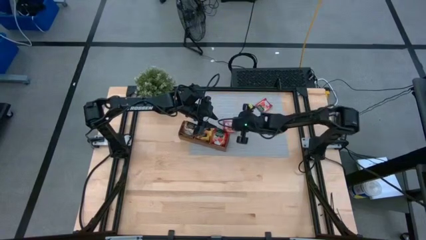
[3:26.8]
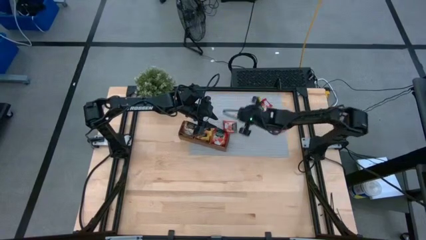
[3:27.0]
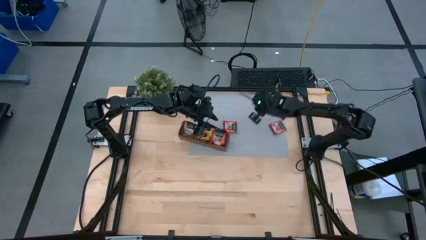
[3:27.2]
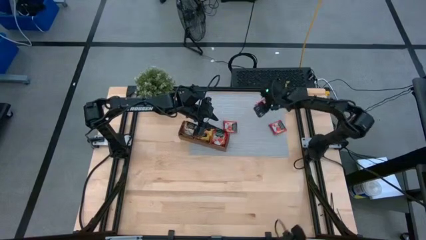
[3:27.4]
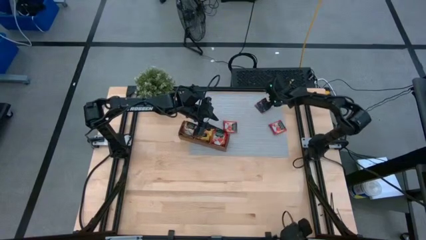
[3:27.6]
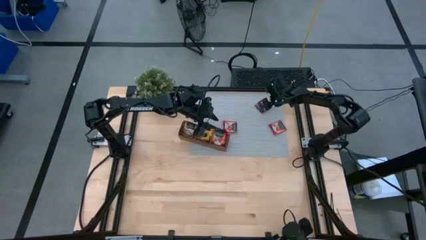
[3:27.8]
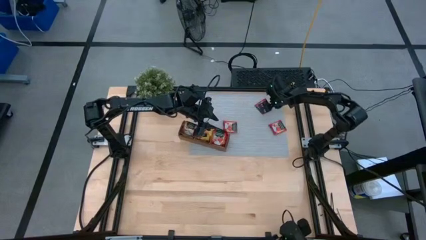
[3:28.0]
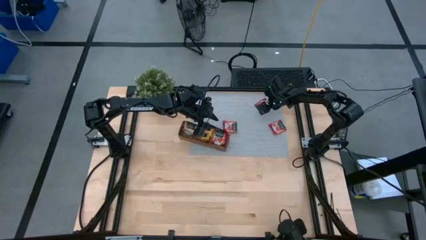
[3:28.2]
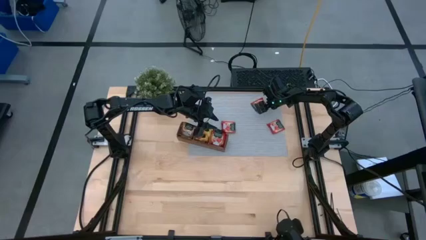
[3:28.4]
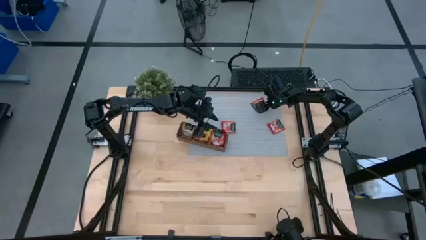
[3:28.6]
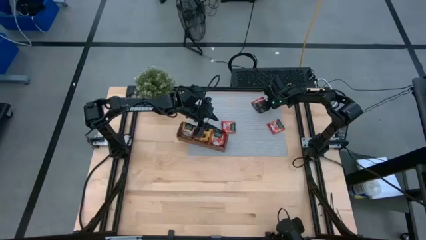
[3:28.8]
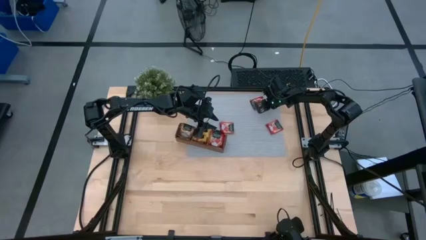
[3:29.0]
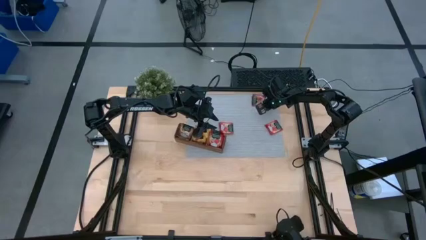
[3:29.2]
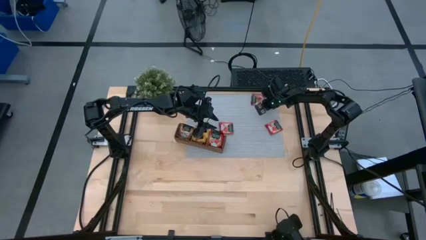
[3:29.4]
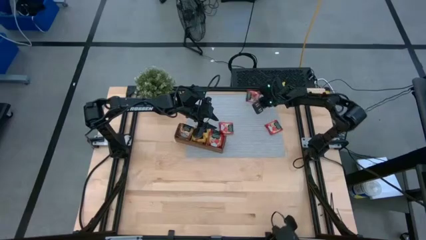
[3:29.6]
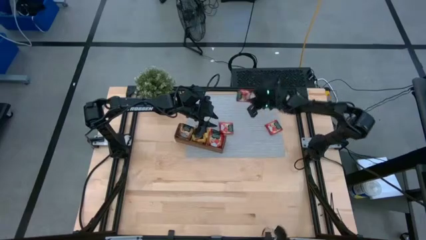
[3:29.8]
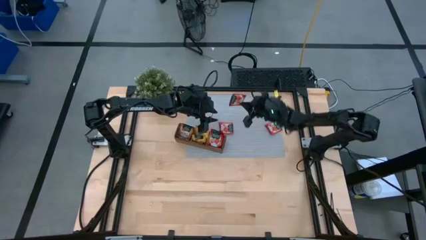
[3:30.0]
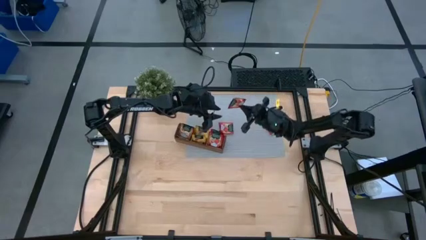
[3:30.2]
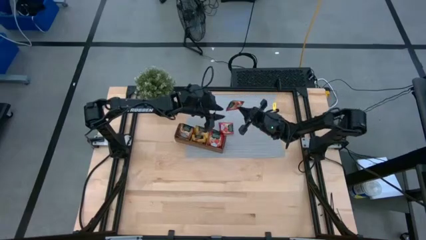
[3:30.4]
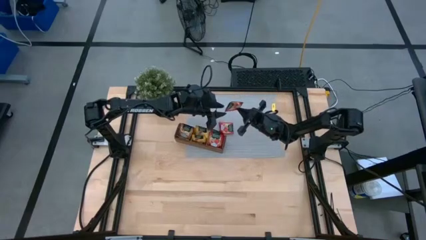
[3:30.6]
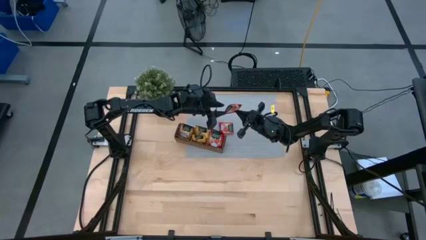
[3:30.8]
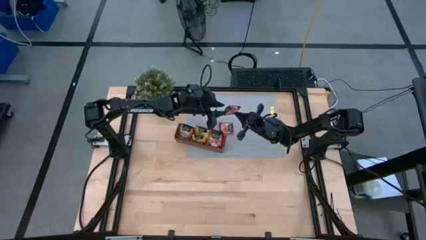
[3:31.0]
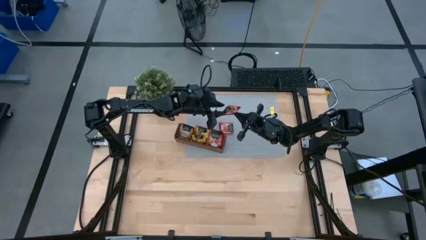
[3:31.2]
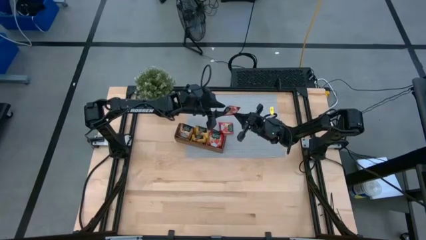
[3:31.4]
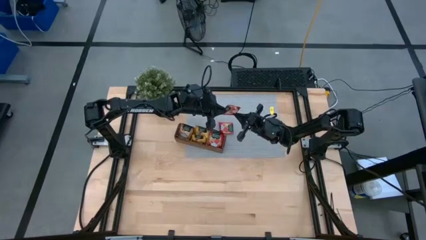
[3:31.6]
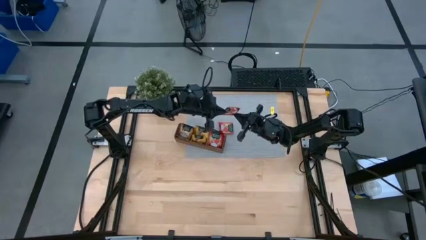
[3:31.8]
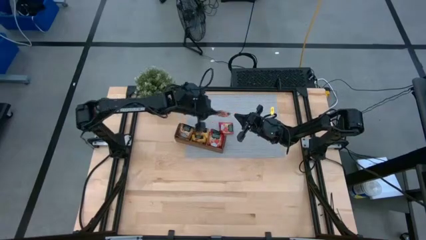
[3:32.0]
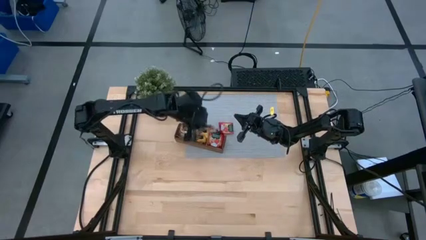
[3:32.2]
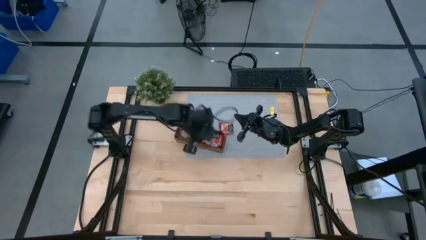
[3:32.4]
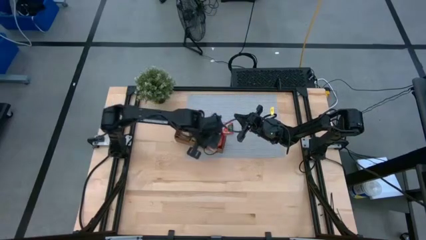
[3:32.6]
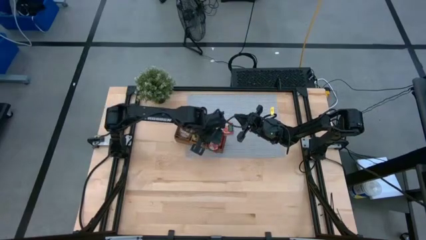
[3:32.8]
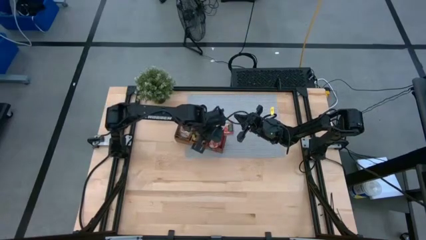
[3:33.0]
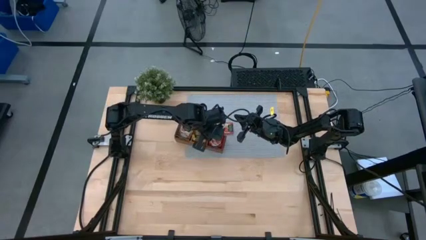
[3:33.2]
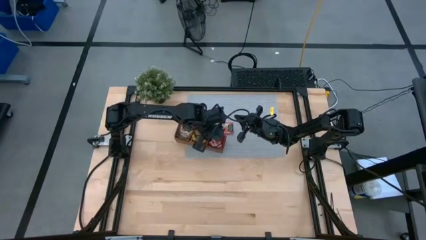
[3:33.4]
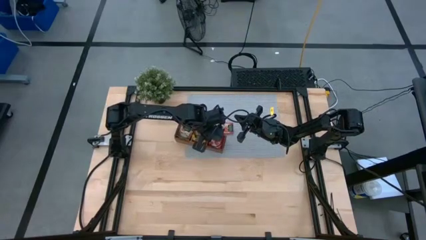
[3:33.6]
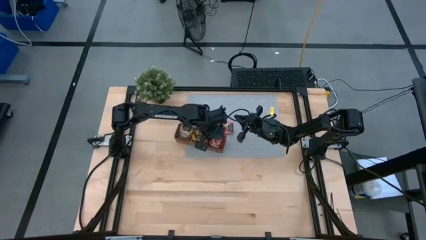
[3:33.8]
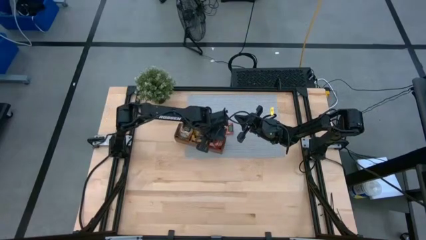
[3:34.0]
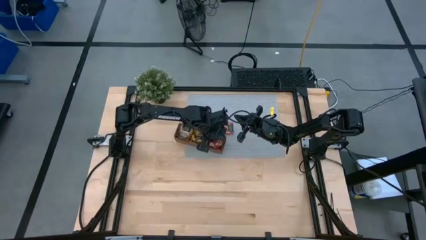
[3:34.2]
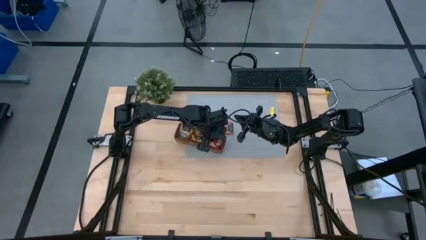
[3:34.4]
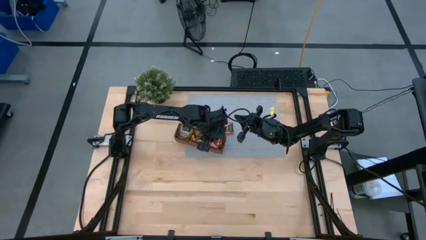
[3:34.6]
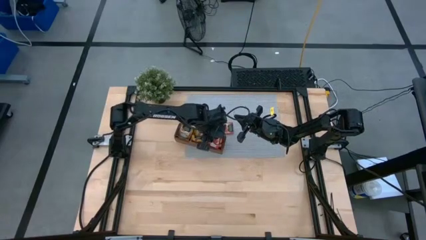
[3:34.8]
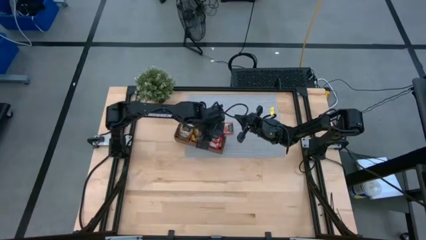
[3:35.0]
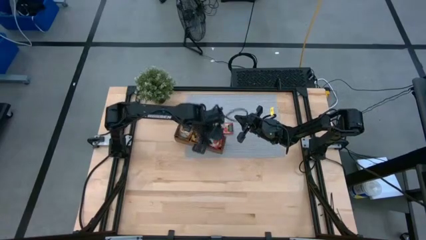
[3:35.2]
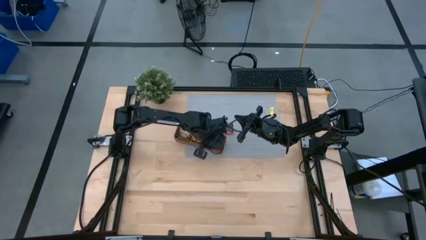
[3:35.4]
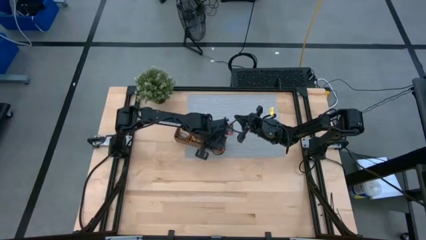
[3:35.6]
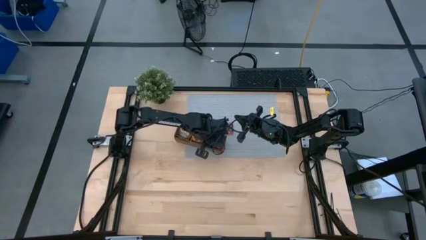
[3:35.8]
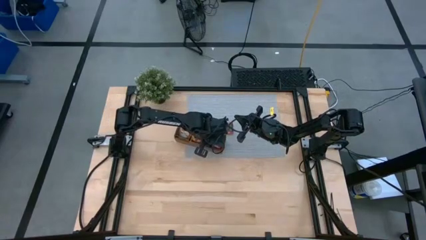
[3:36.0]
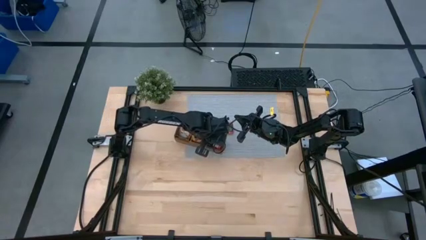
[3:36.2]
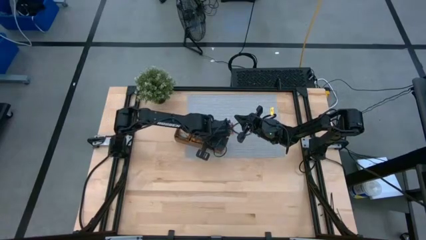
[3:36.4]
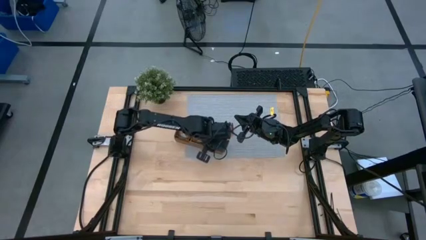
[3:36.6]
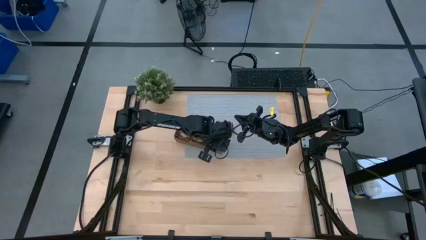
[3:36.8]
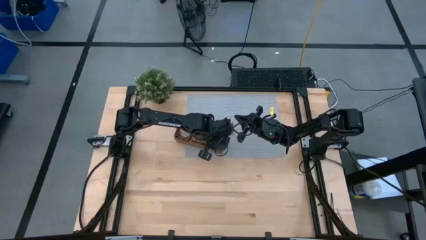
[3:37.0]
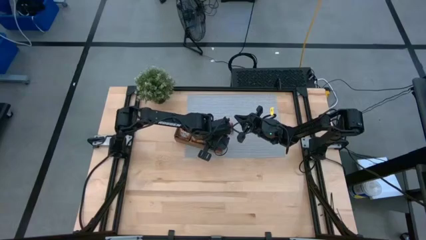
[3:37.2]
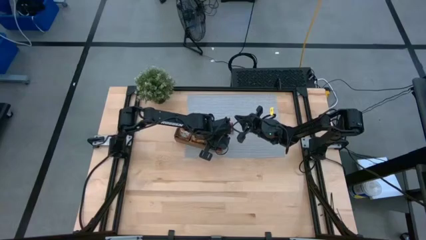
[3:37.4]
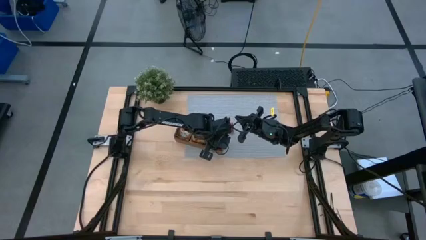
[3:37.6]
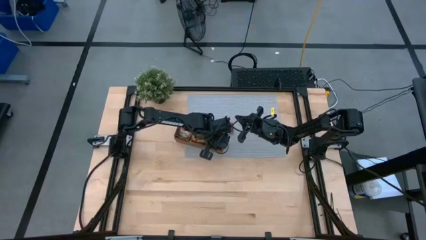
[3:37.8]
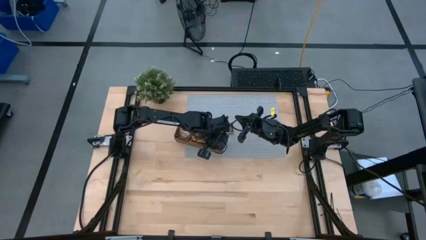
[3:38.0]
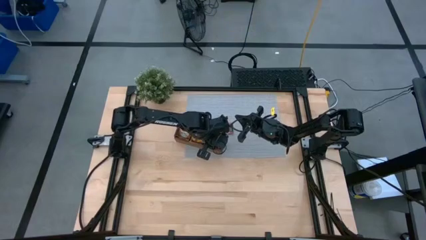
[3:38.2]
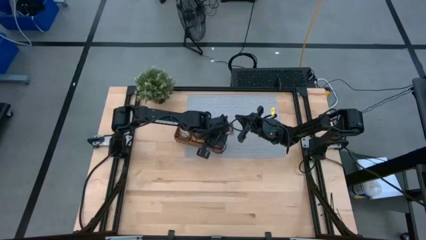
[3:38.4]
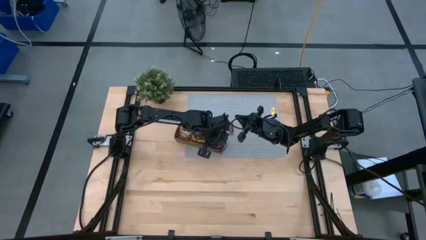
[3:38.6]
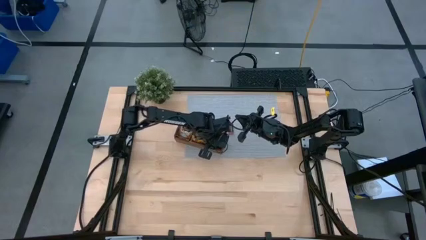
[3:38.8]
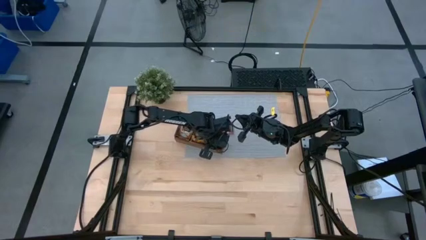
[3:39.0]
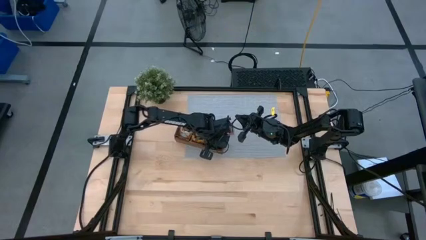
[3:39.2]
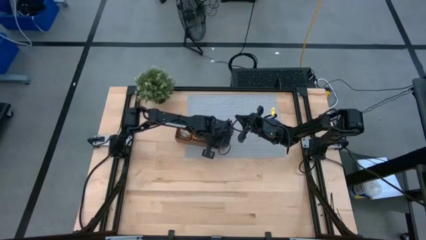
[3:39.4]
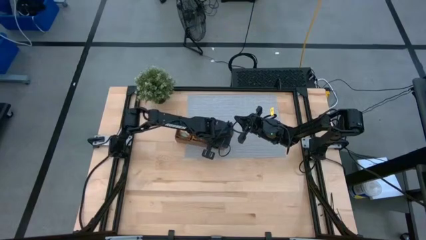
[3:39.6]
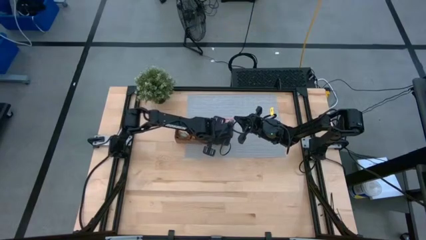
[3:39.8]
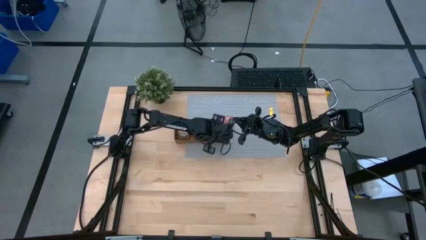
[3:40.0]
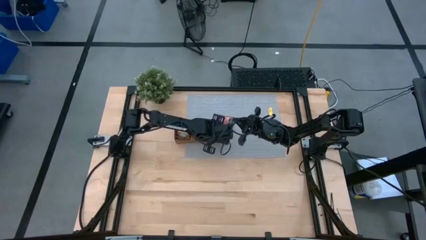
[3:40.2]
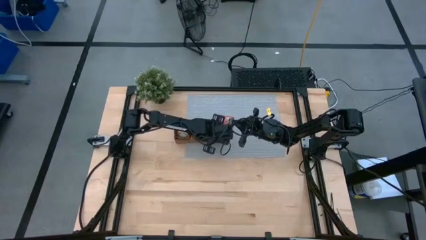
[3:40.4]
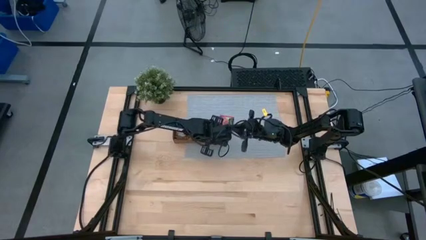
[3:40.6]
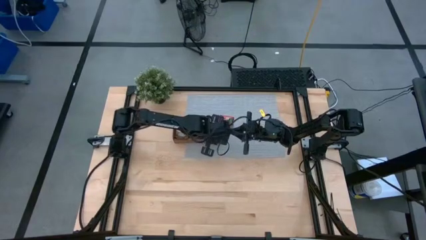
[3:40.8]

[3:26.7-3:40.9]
Task: Pick & Place Tea
Put the red tea bag into the right section of the wooden organizer

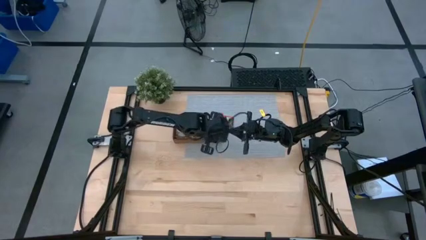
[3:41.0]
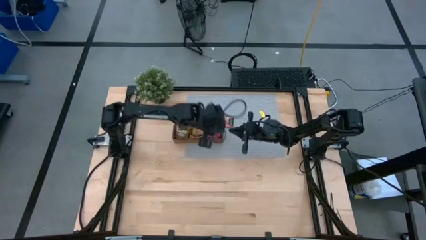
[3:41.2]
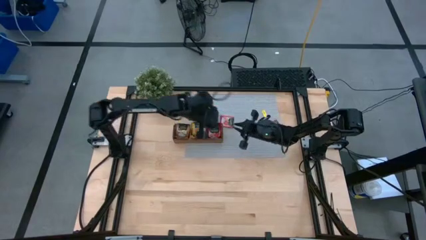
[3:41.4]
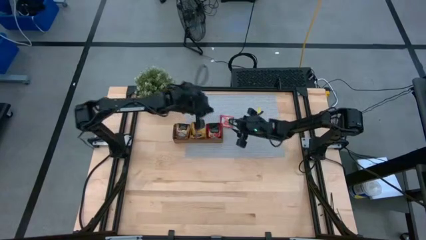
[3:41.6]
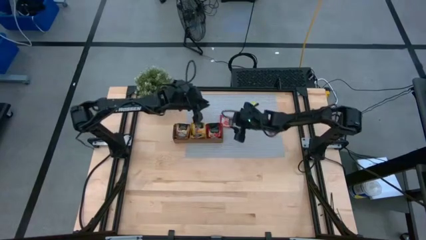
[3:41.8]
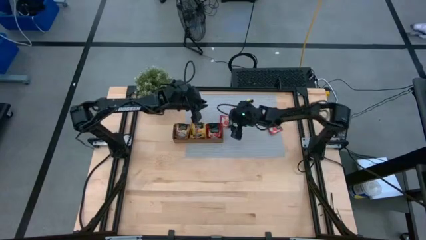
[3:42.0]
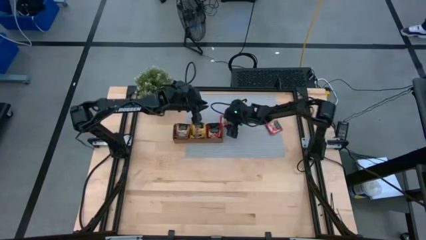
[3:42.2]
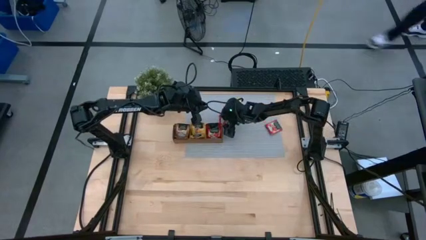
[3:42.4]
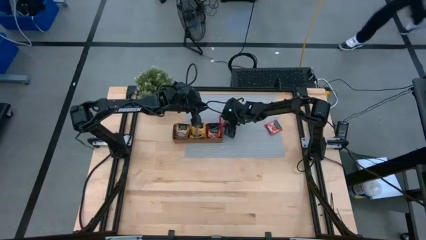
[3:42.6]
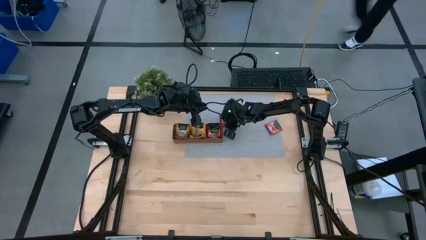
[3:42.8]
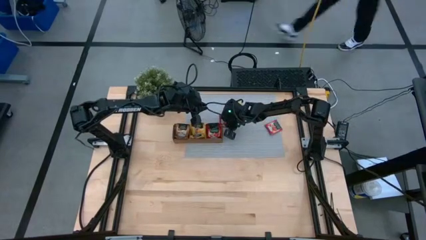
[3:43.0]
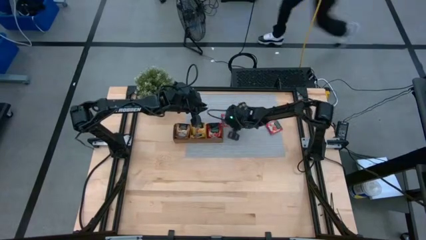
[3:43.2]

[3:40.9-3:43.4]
Put the red tea bag into the right section of the wooden organizer
